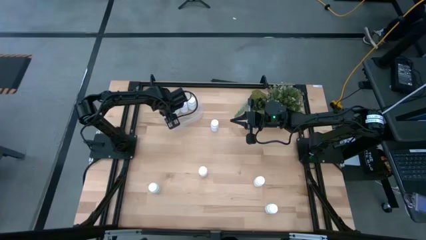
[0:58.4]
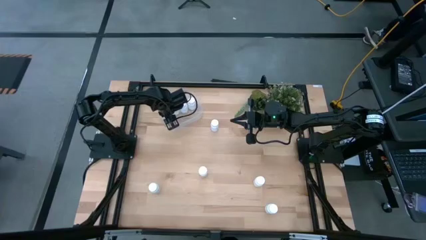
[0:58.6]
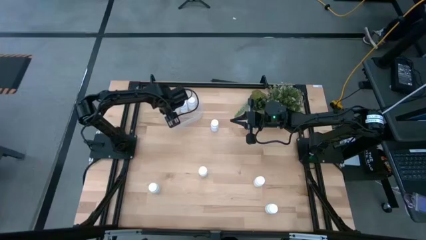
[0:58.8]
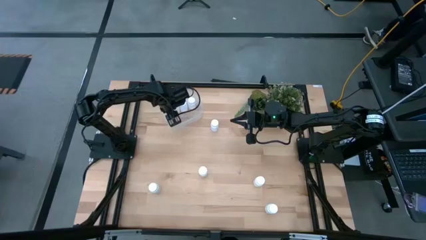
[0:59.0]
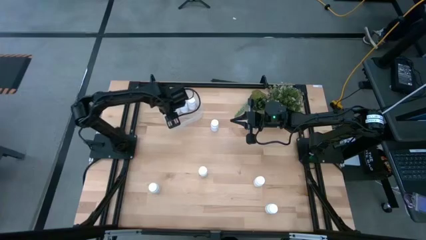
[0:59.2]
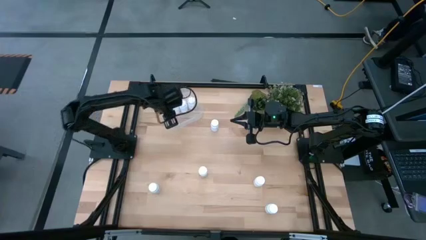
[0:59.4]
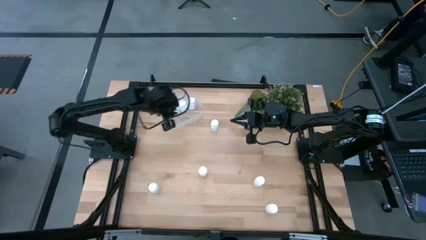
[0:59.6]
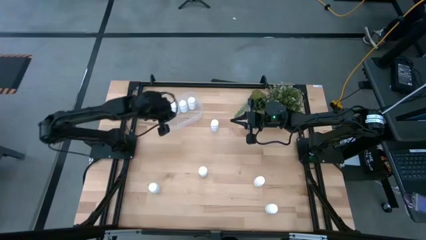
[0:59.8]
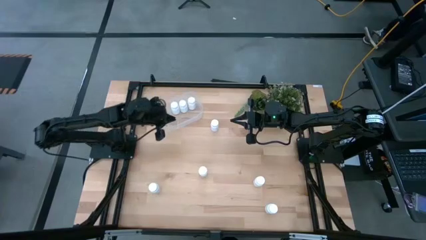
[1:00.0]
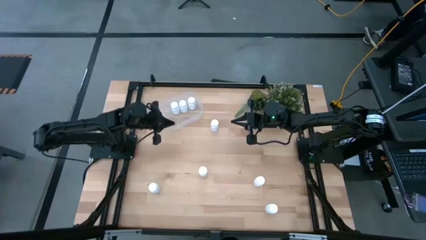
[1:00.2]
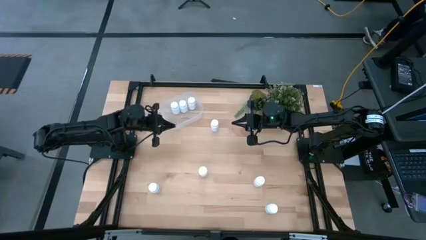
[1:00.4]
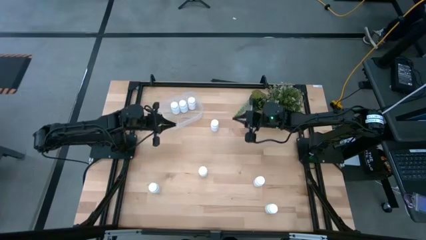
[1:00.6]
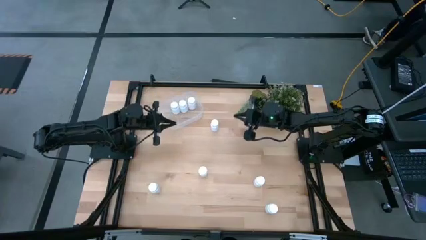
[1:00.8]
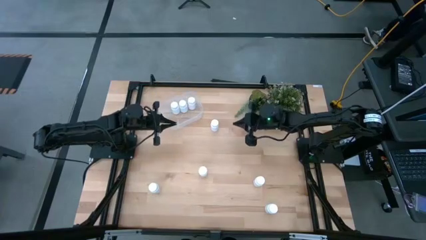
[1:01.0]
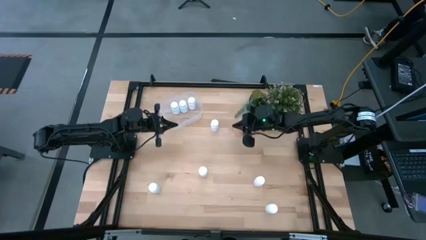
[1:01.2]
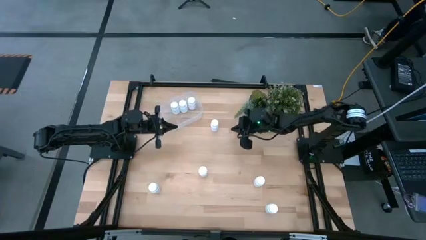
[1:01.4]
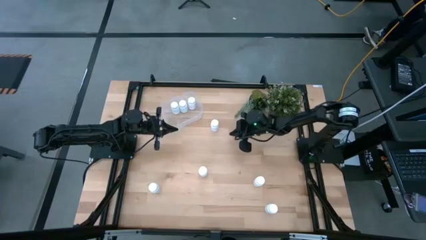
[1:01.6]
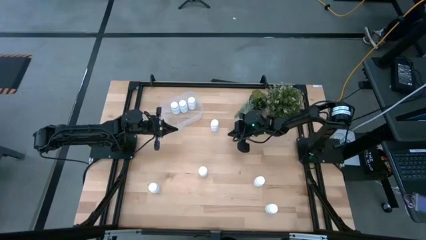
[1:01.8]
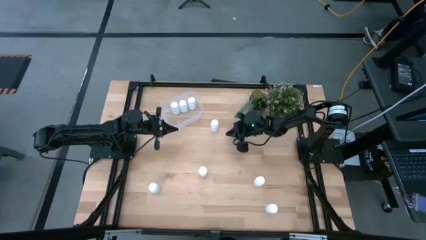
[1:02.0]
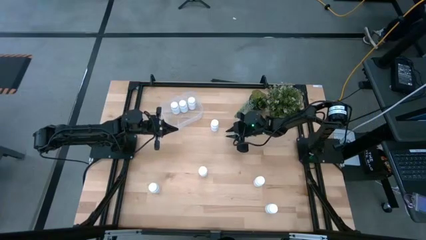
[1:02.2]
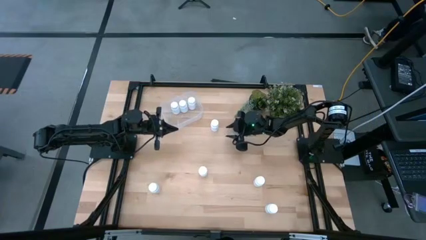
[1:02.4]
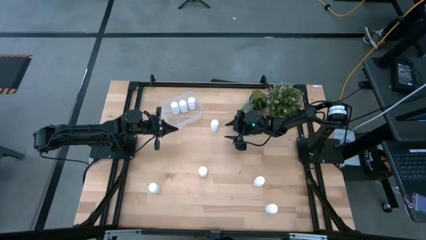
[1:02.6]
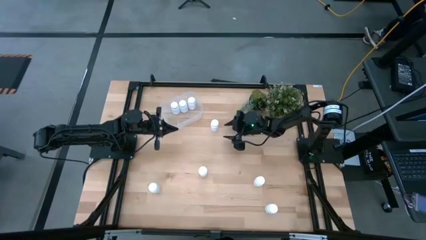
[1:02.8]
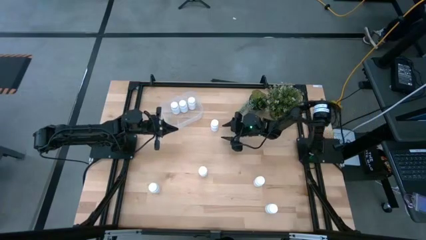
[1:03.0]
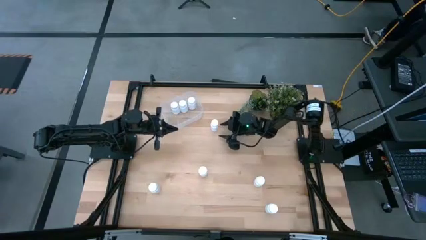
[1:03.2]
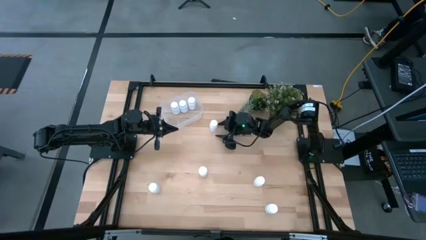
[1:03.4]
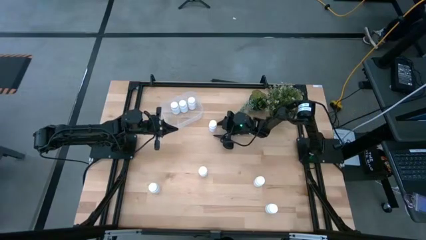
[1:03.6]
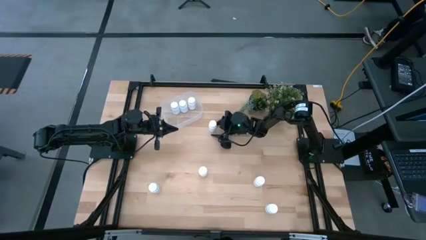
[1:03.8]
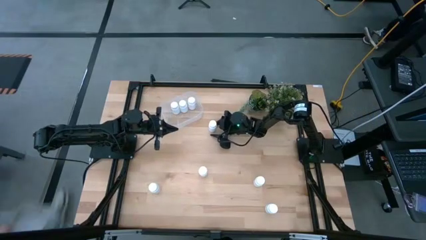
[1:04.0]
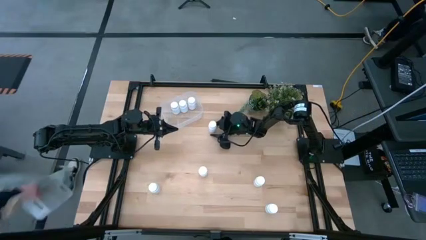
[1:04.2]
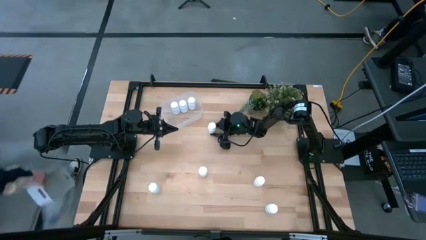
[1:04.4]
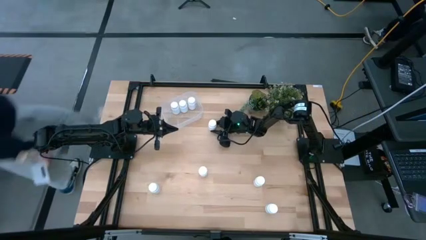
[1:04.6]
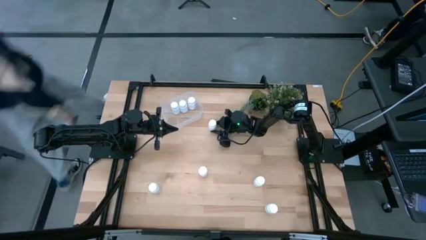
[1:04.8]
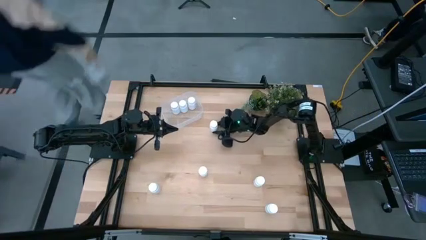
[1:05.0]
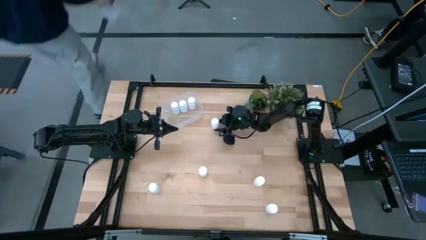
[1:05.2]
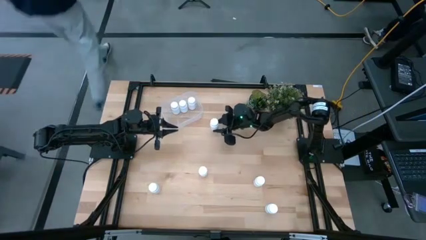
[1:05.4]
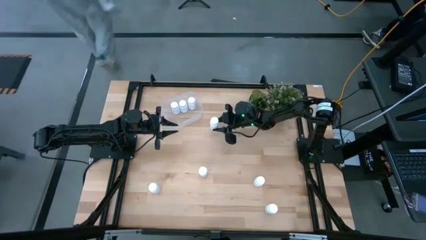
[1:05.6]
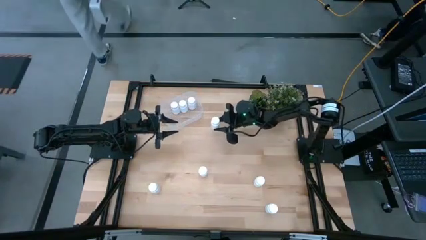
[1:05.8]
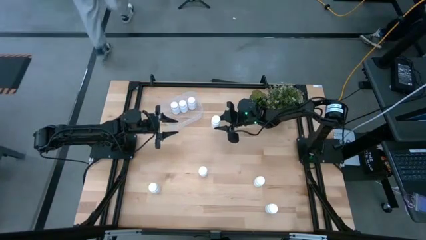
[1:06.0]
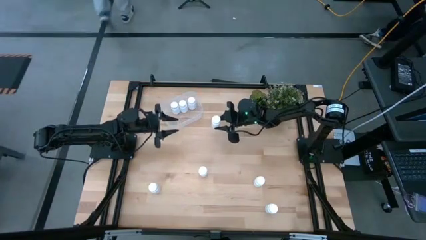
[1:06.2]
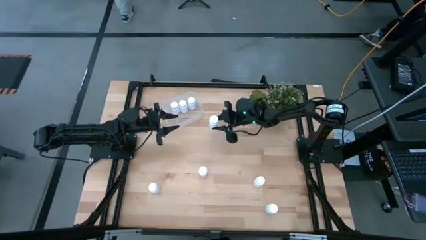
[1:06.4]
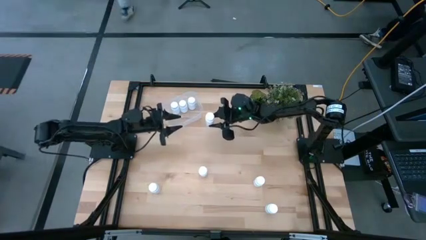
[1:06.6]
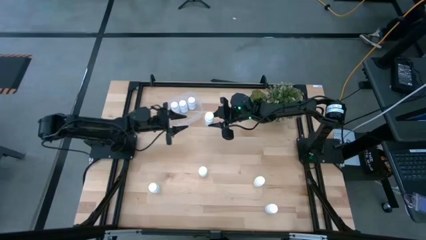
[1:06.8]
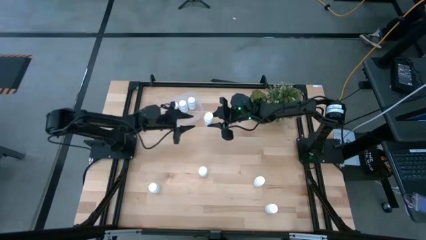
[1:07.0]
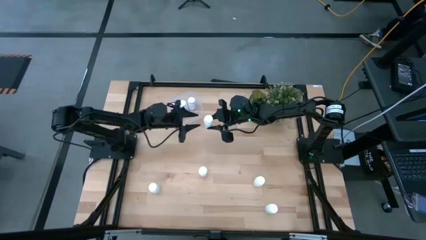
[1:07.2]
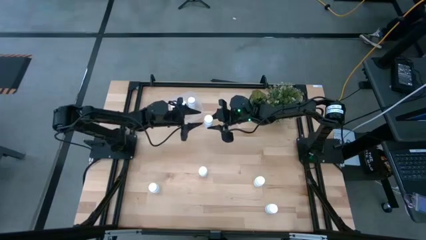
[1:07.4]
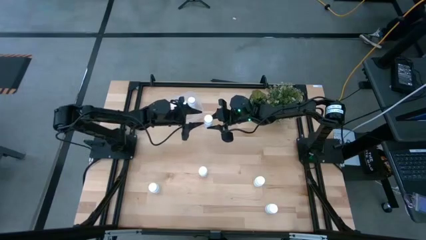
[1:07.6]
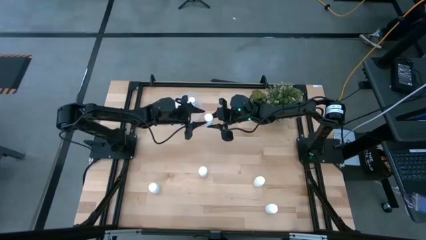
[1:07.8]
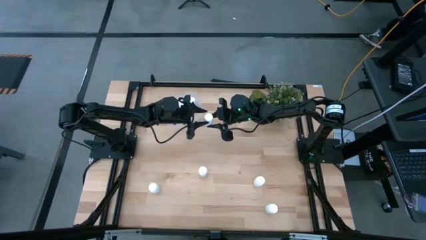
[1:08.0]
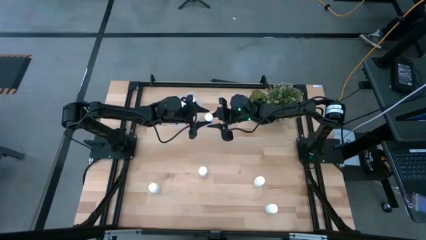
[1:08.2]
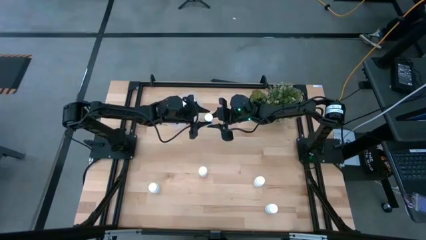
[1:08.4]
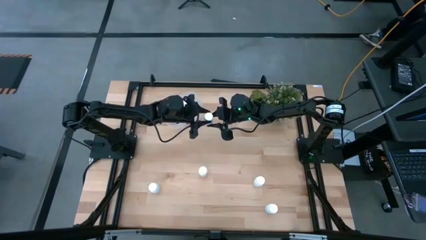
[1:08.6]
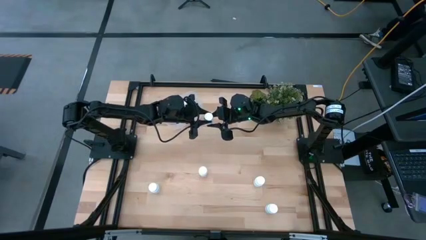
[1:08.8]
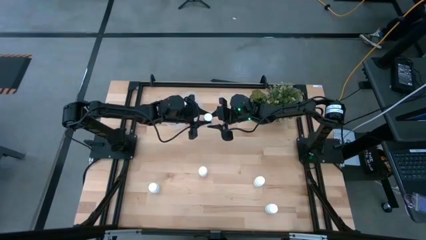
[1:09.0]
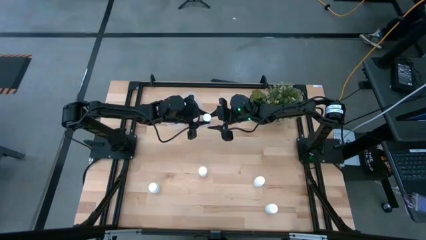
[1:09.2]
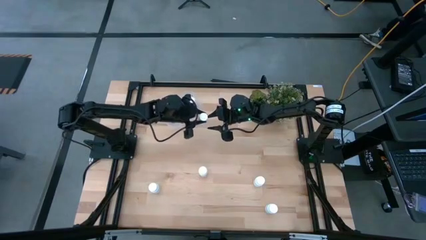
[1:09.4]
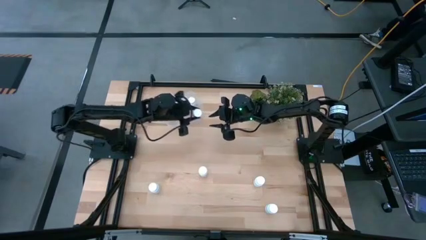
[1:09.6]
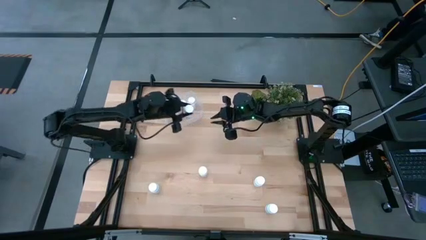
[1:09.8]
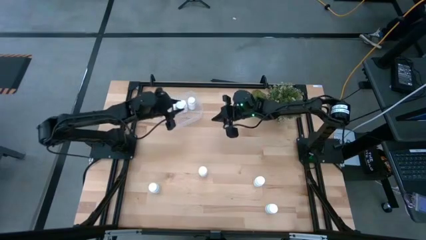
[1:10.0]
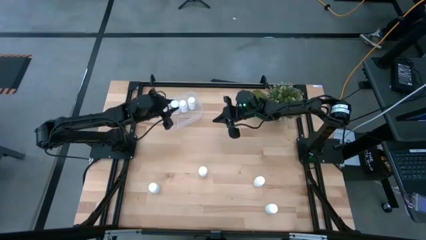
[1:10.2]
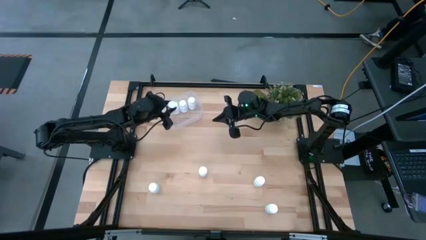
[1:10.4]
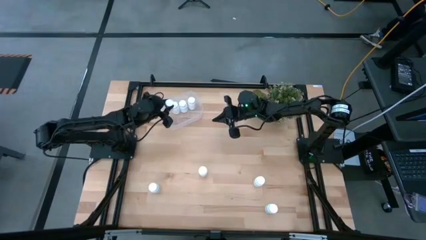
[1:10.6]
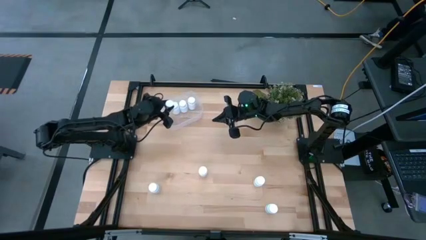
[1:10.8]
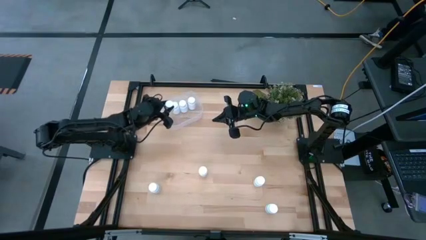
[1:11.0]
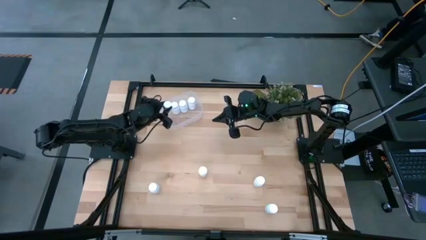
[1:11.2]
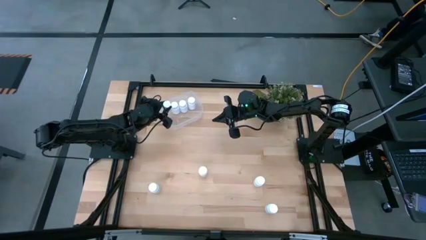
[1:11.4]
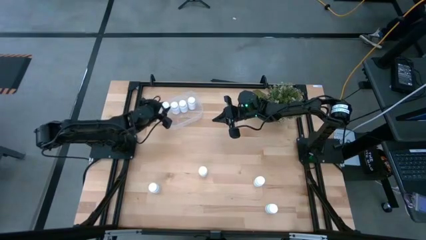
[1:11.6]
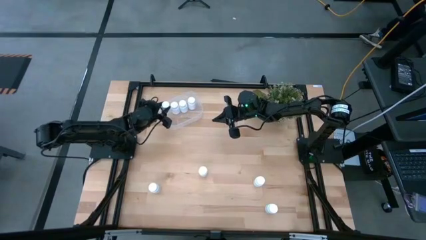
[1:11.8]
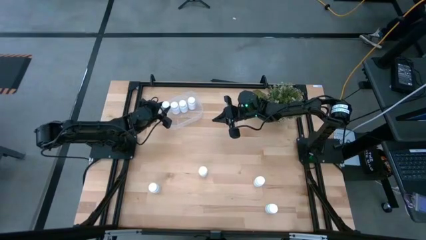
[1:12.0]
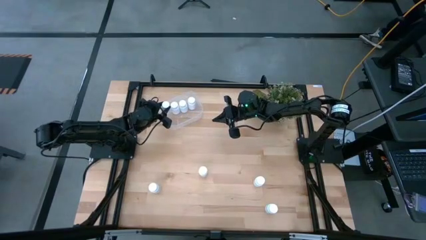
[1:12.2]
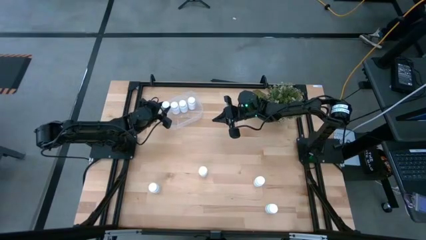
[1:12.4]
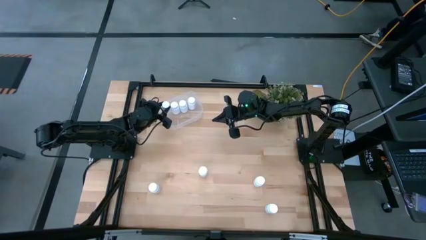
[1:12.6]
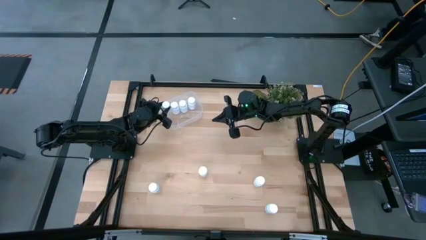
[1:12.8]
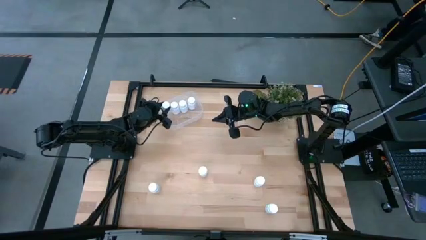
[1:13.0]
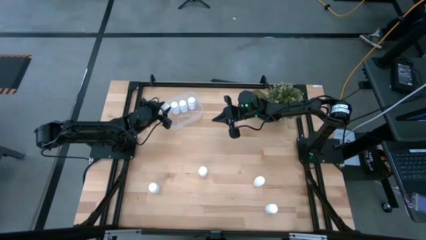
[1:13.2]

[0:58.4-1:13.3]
Task: Pick and place pill bottles into a basket
Put the white medicine bottle into the transparent bin
